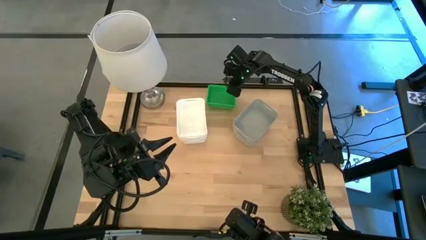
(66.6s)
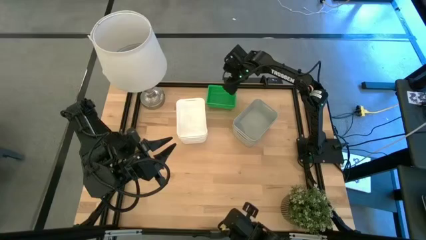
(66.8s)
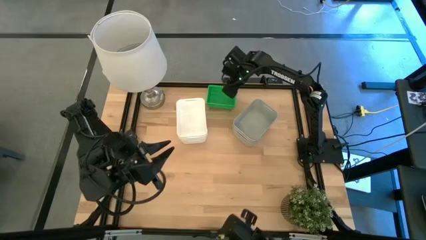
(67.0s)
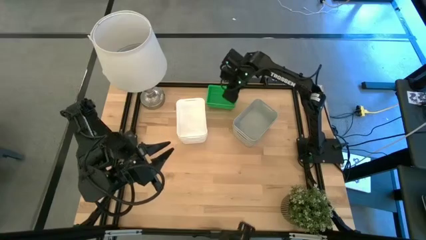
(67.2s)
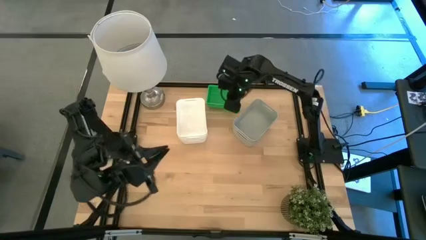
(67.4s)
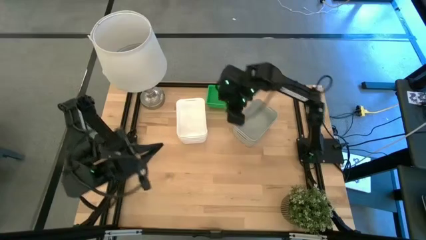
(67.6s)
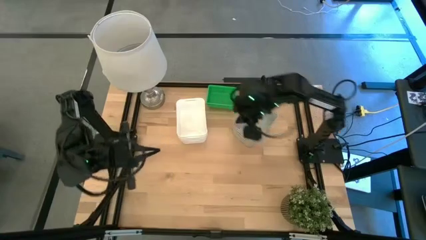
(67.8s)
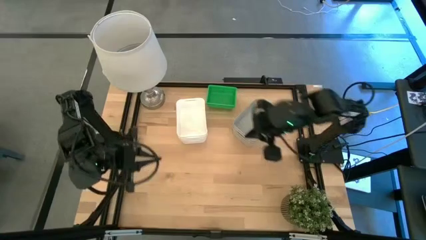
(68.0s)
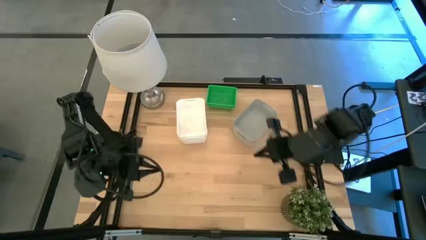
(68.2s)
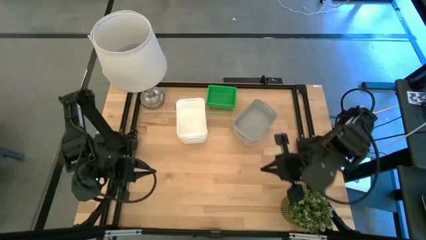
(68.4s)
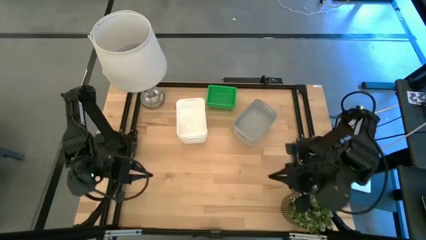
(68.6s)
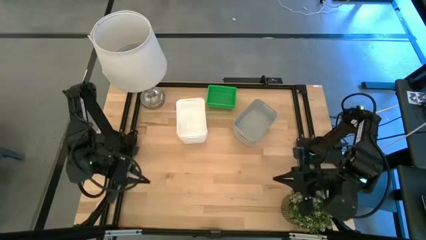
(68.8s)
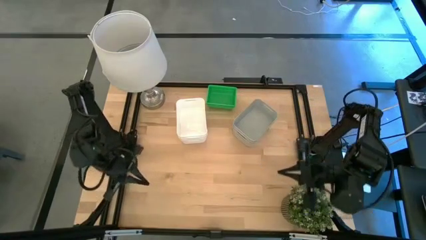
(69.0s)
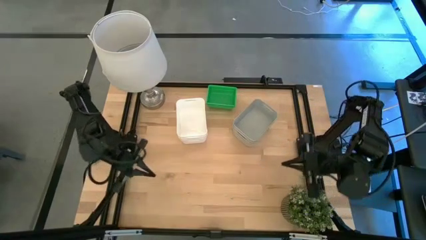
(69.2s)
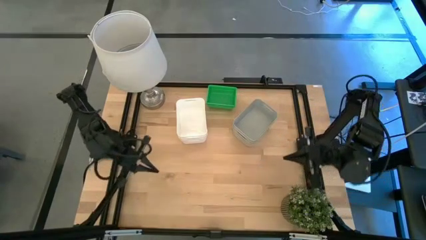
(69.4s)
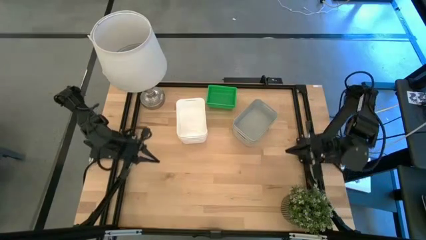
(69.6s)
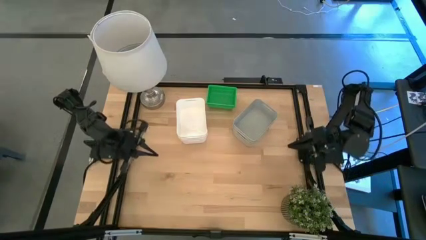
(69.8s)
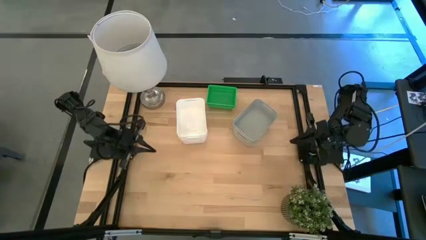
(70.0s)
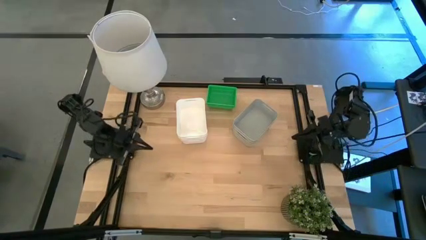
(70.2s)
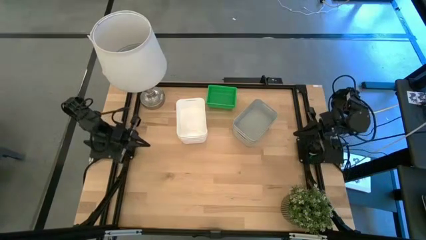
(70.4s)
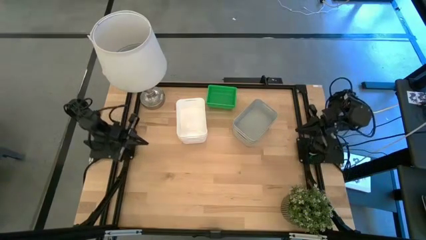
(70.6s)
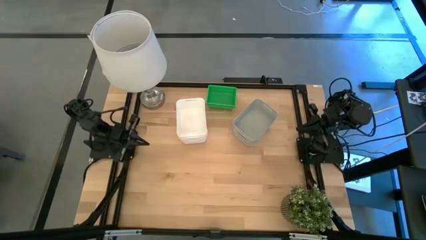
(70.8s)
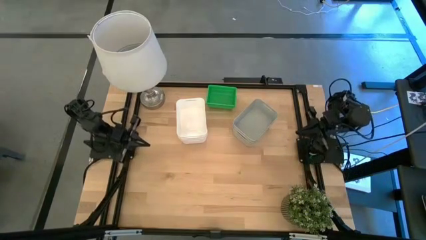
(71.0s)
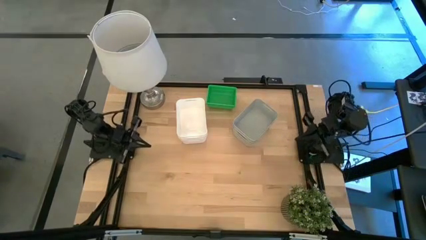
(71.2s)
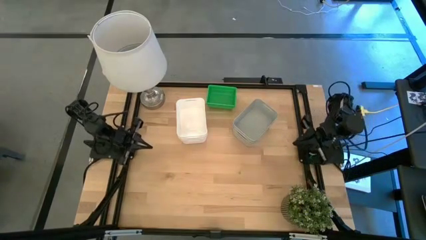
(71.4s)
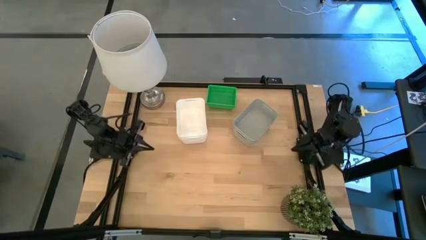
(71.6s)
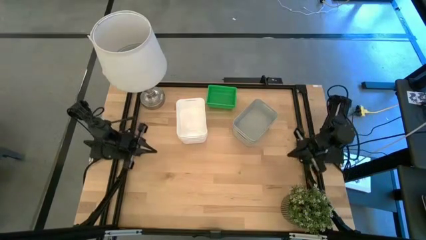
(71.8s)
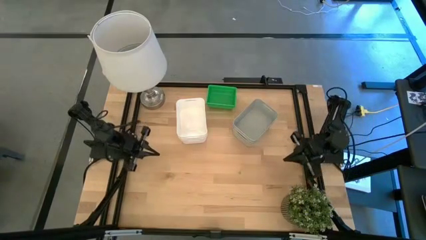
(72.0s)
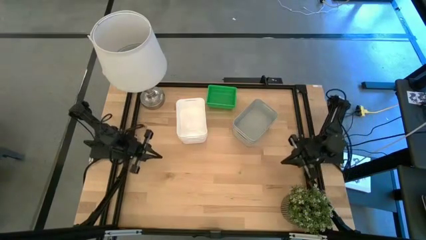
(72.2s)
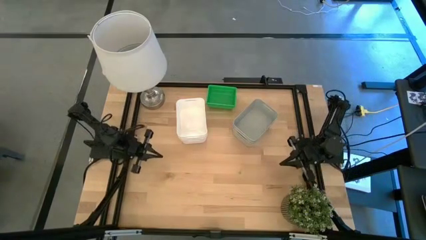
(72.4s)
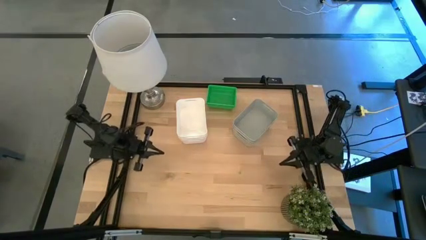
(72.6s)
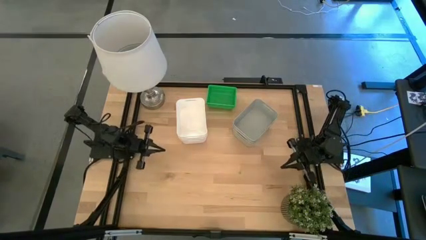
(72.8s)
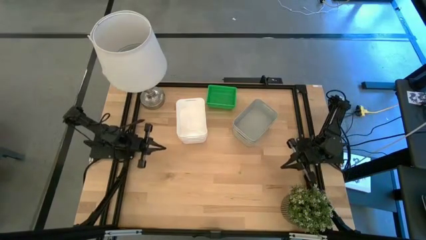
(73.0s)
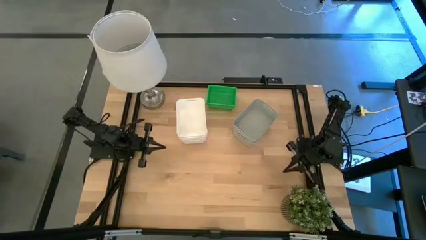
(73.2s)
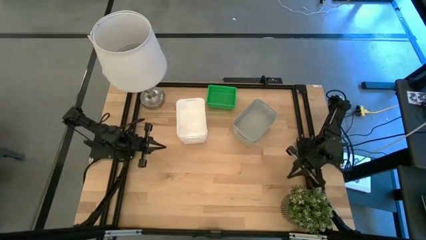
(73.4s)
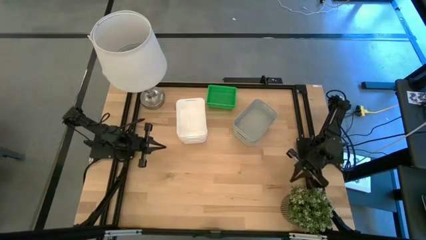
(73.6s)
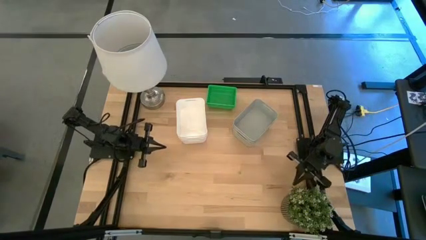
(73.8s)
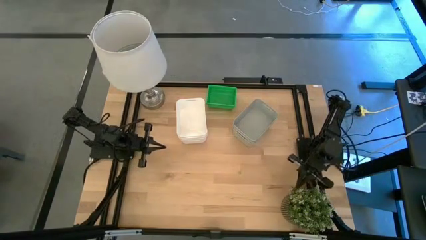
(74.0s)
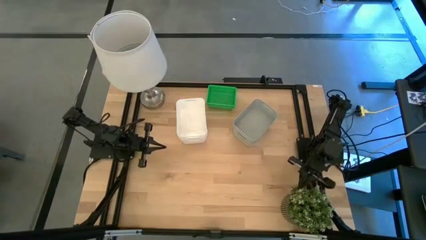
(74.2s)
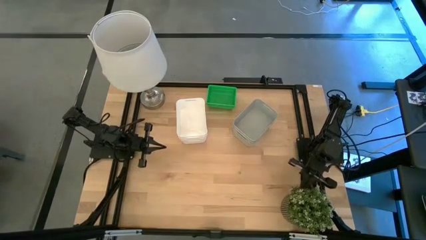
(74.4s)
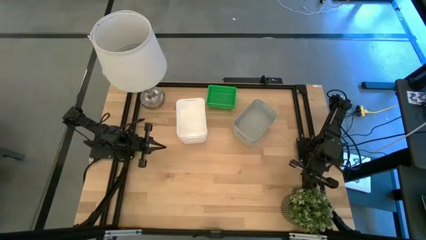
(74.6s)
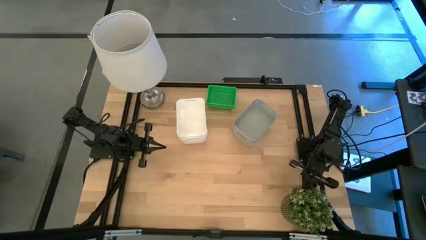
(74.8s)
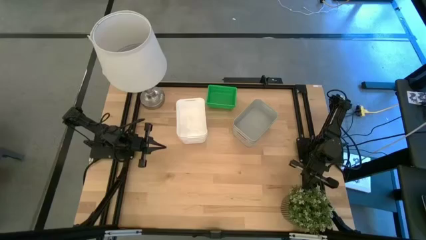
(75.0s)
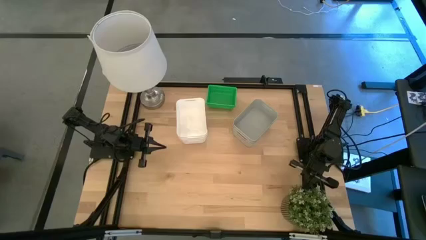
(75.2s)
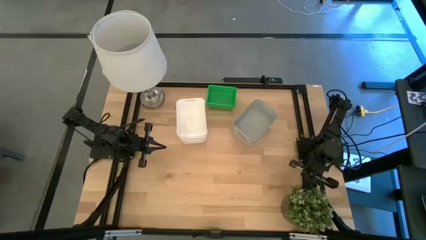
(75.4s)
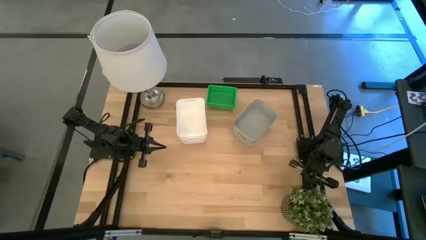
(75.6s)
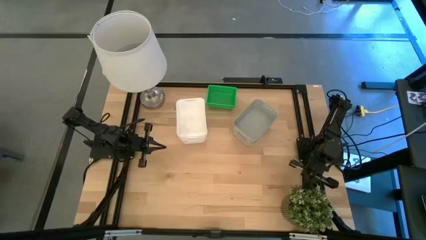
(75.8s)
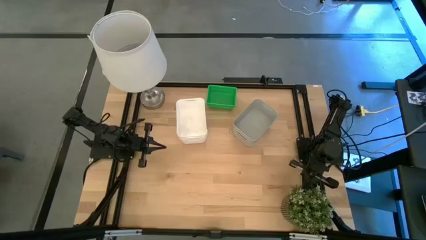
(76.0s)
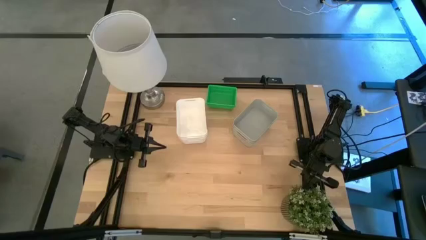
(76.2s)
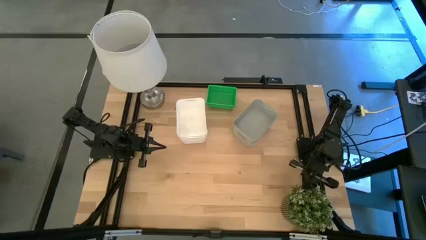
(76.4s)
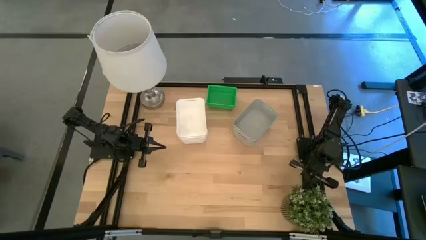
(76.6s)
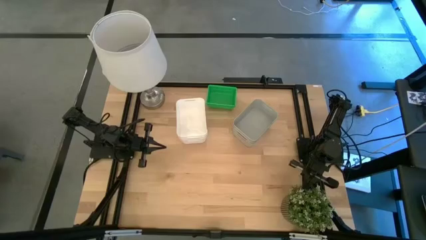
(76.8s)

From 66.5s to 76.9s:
Return to Home Position

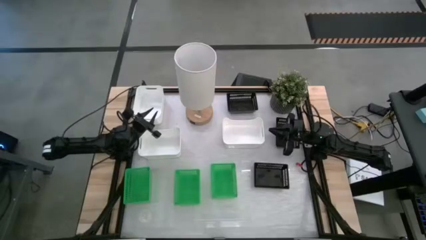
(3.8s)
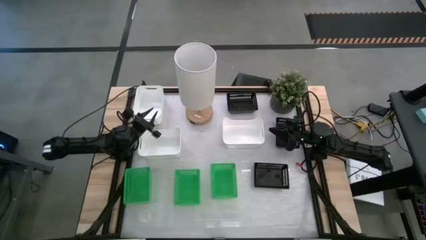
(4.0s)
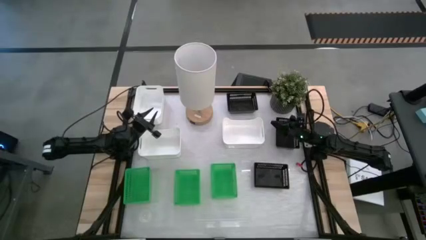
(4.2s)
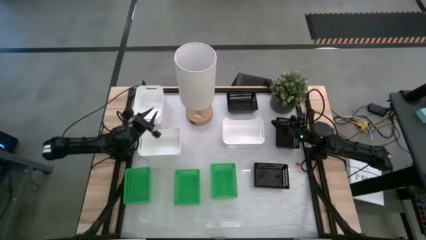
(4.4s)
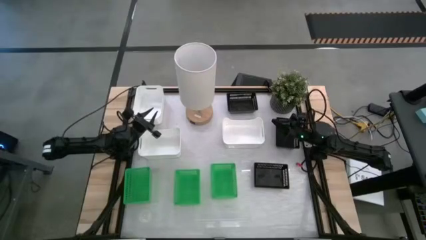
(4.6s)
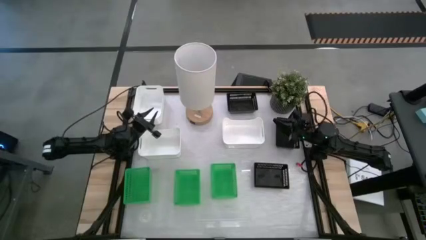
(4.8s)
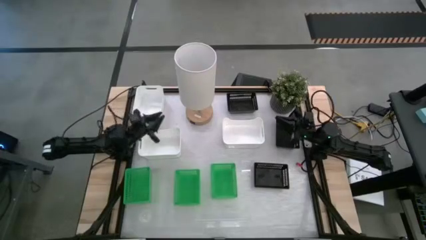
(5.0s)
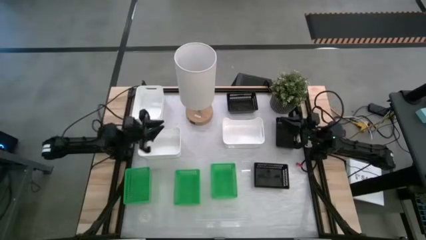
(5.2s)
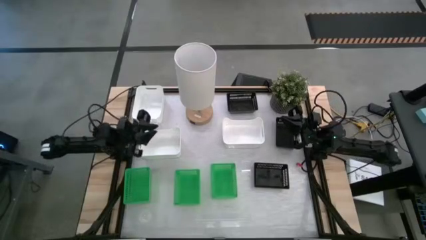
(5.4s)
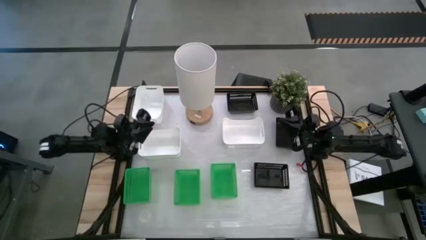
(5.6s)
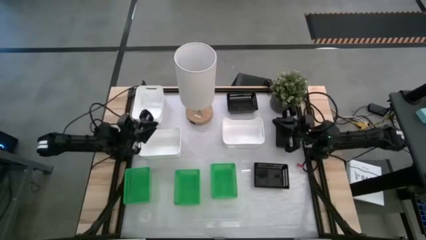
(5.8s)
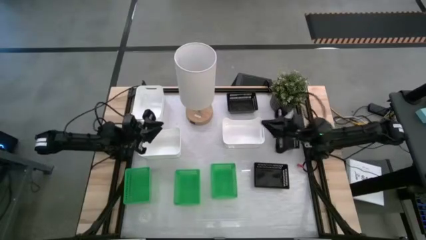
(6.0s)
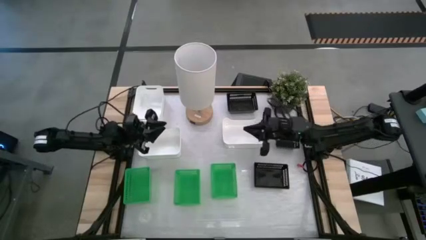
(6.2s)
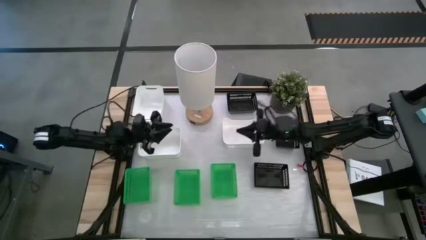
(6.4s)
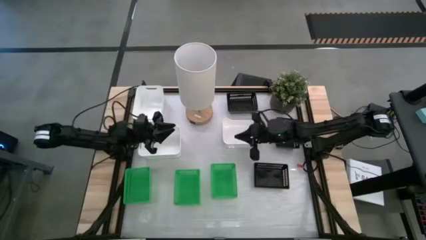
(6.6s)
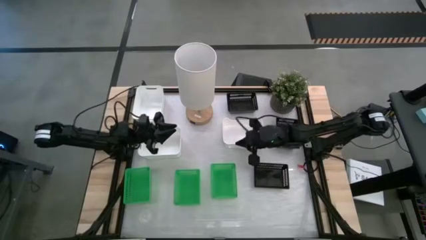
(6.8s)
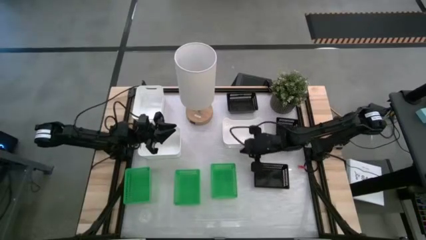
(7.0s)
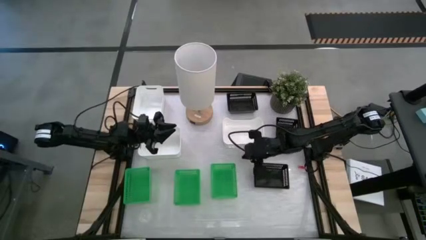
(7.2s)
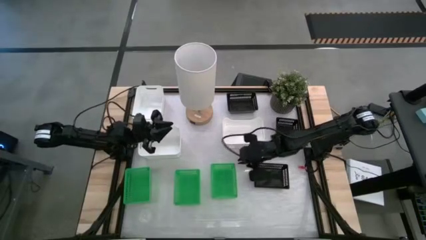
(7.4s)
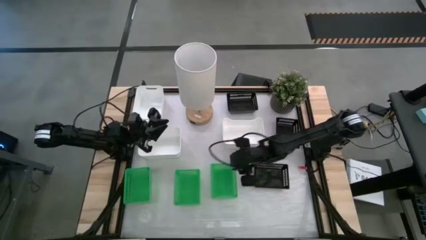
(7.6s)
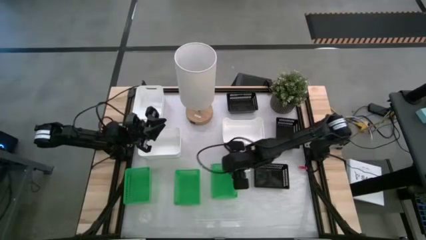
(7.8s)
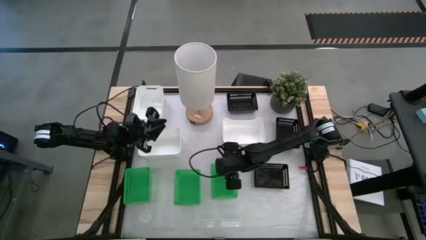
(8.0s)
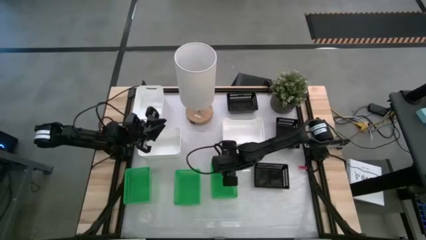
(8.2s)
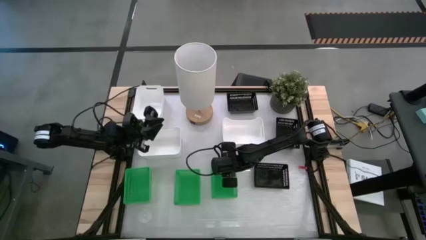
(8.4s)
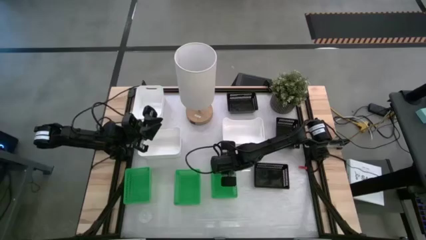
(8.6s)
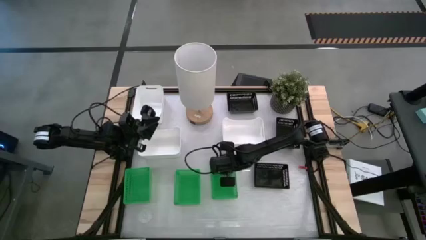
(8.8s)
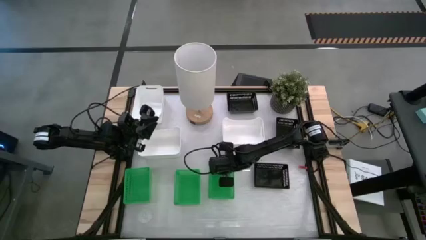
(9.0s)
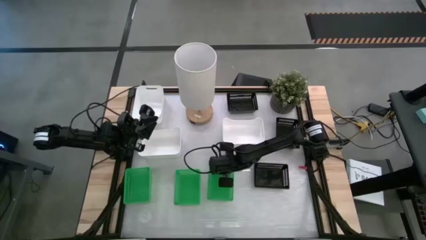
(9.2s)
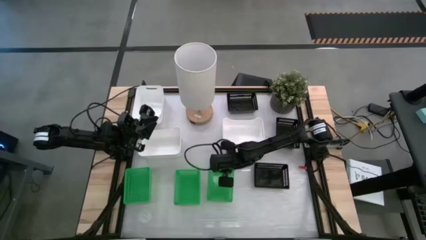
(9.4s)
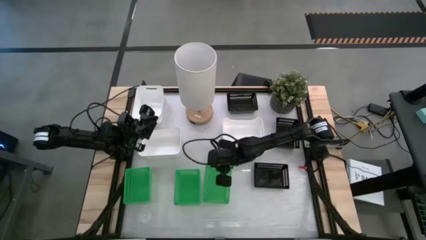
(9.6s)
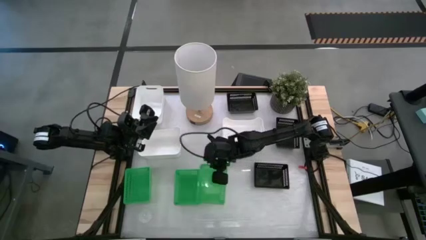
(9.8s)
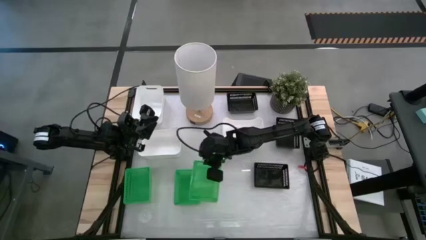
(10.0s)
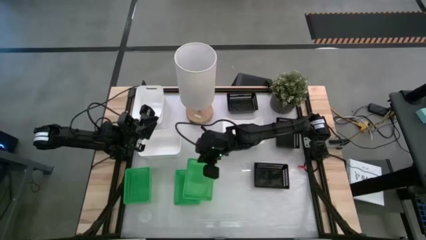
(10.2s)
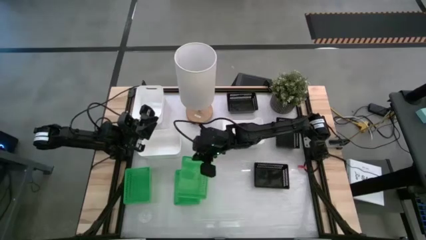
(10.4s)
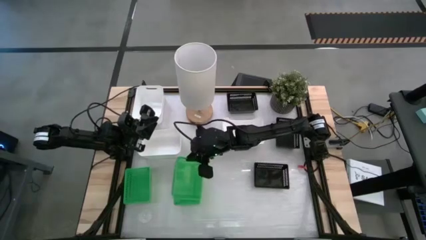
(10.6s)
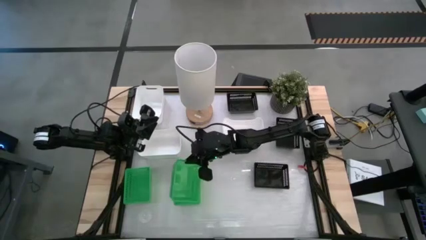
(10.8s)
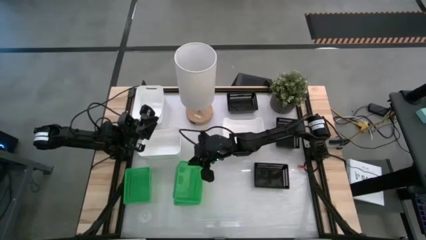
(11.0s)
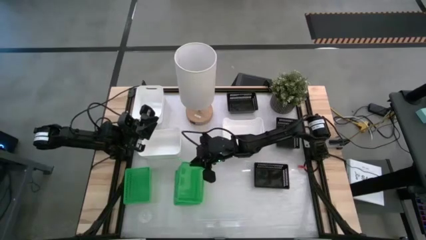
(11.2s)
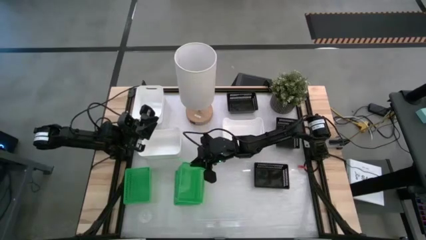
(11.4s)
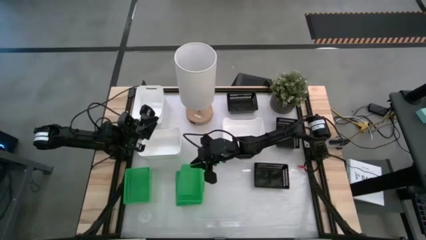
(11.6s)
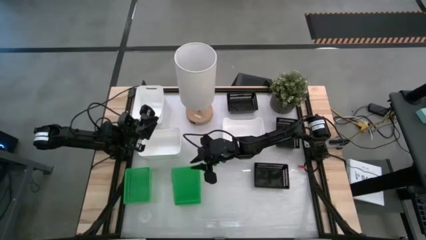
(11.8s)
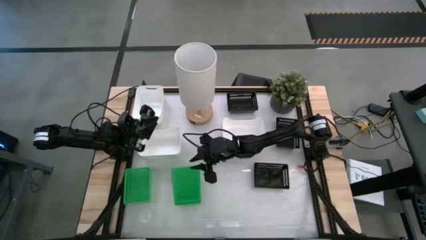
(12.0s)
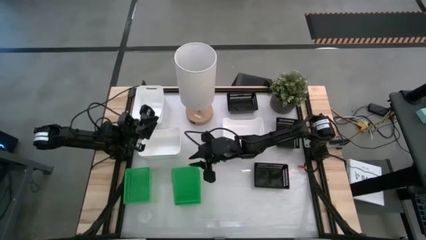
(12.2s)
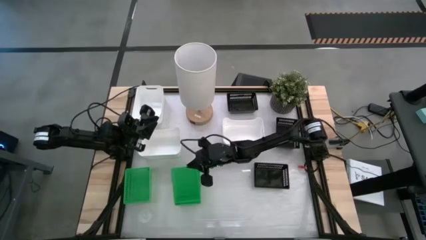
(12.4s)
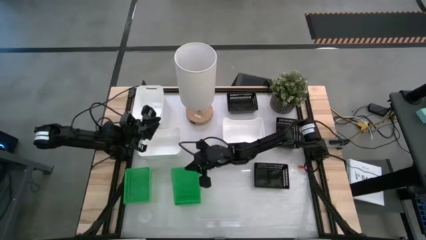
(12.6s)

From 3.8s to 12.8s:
Stack the right green bin on the middle green bin
